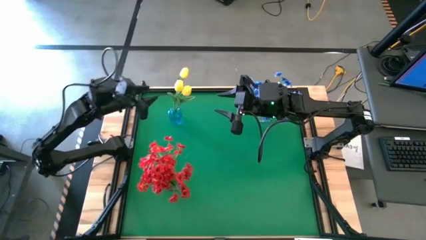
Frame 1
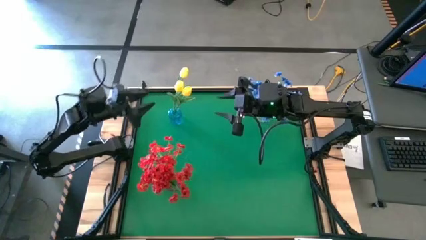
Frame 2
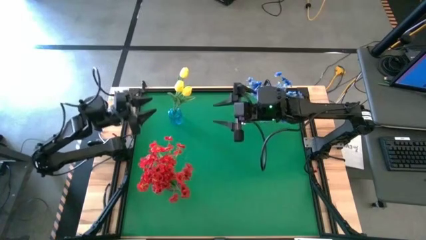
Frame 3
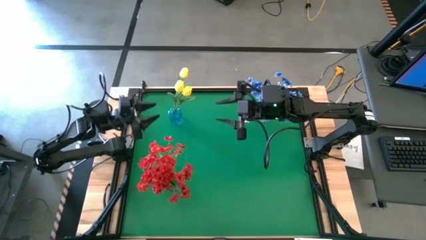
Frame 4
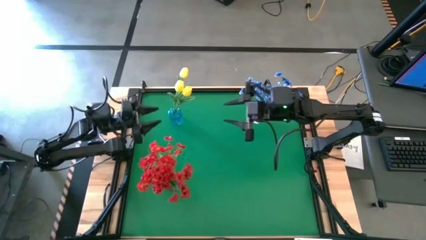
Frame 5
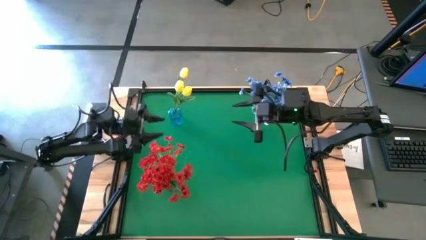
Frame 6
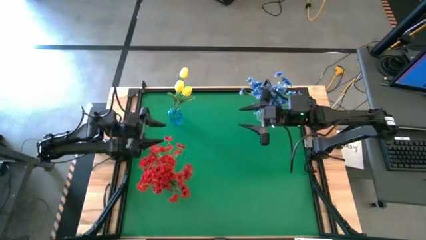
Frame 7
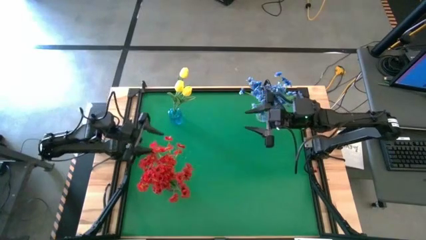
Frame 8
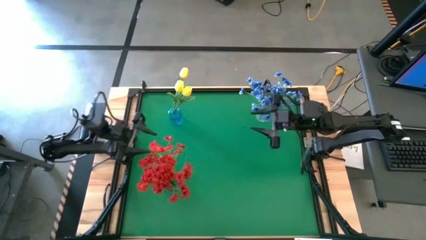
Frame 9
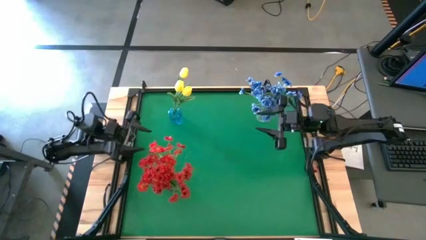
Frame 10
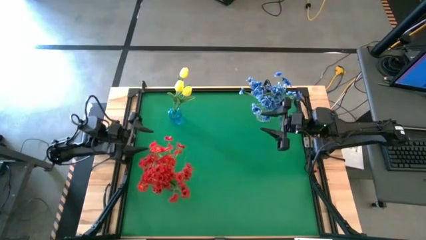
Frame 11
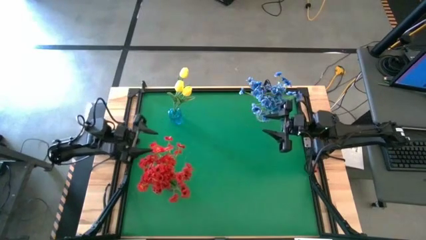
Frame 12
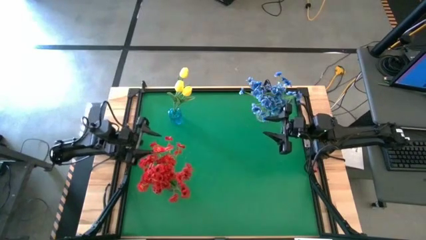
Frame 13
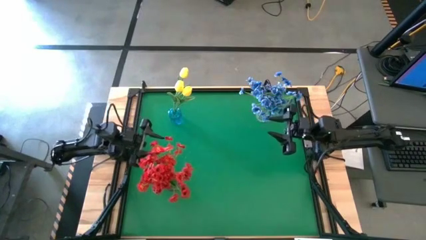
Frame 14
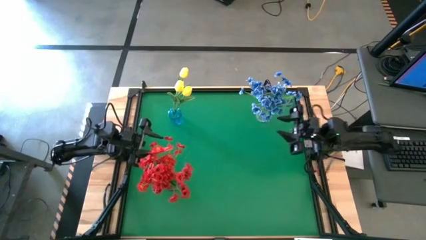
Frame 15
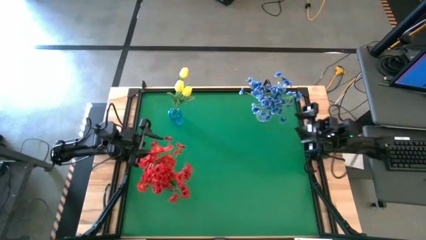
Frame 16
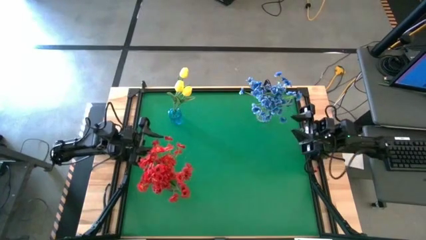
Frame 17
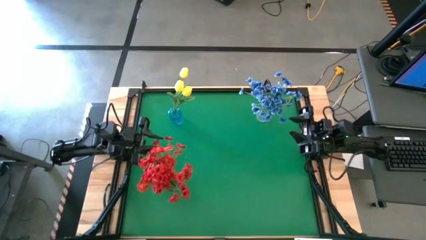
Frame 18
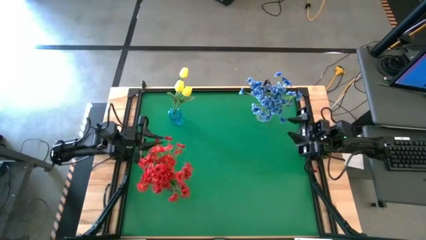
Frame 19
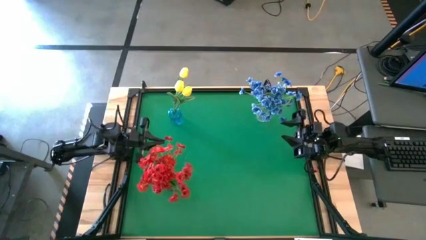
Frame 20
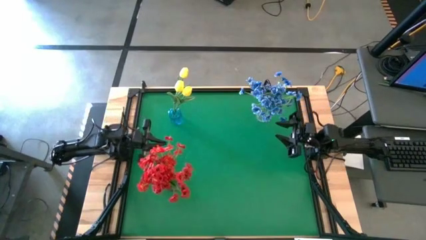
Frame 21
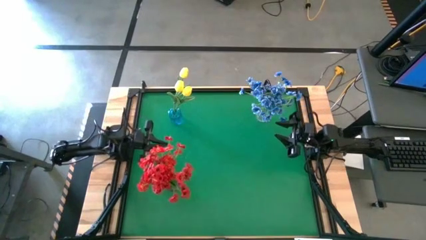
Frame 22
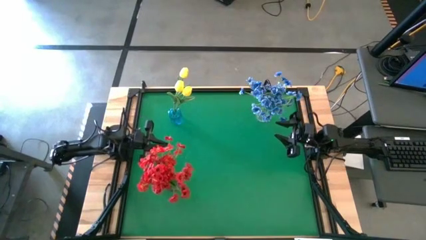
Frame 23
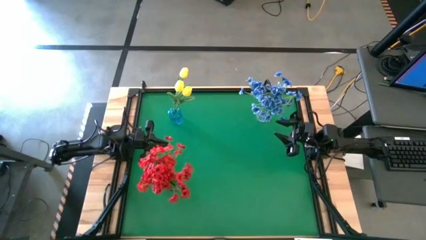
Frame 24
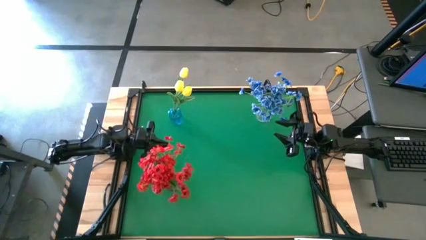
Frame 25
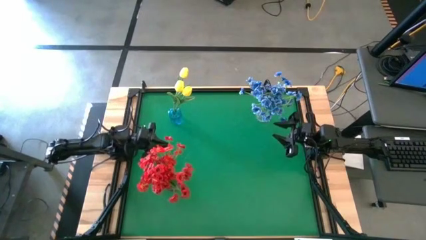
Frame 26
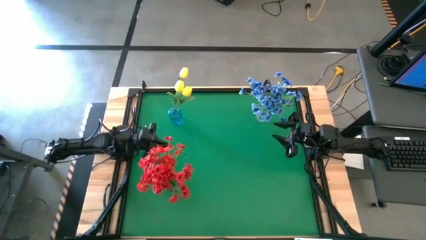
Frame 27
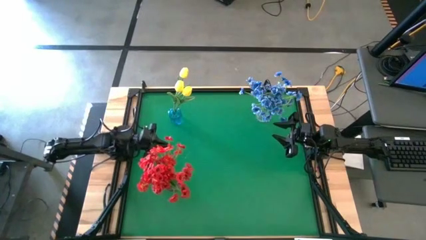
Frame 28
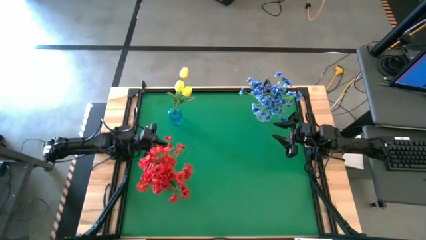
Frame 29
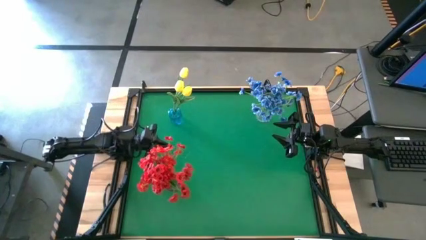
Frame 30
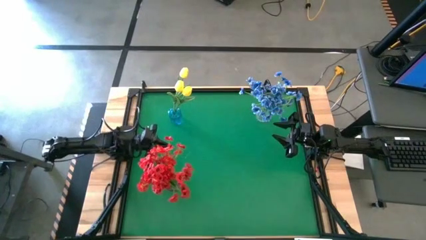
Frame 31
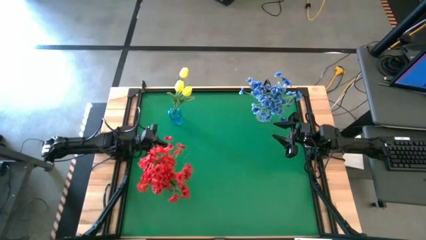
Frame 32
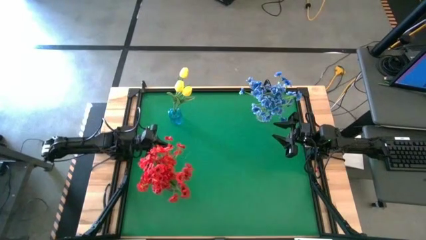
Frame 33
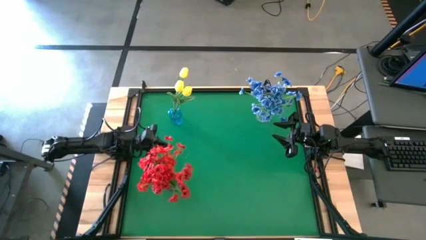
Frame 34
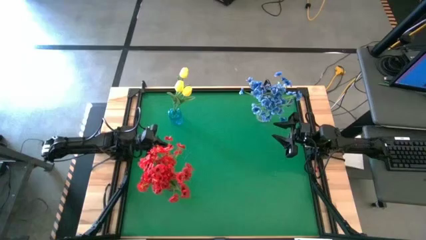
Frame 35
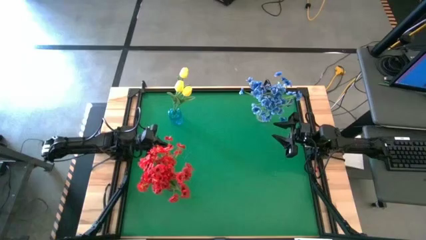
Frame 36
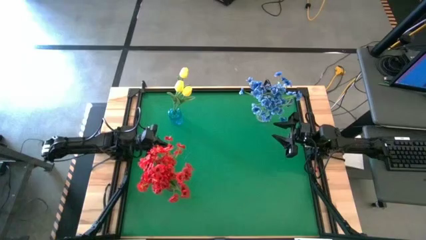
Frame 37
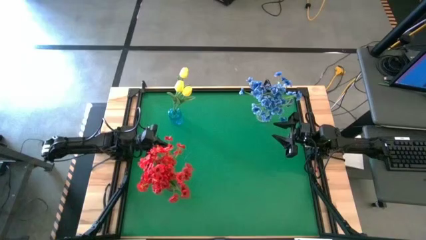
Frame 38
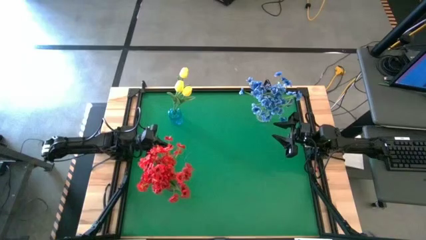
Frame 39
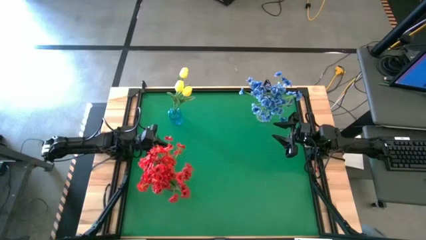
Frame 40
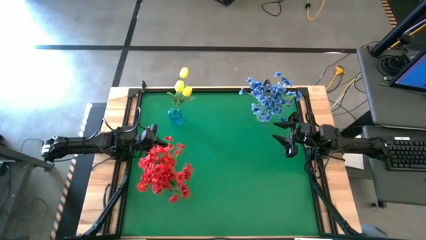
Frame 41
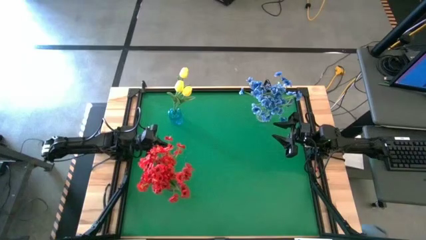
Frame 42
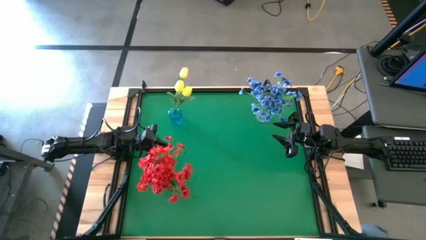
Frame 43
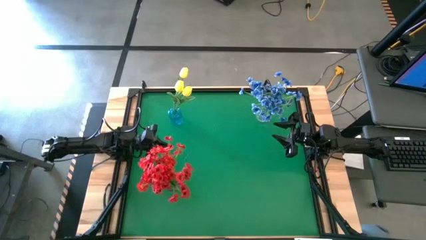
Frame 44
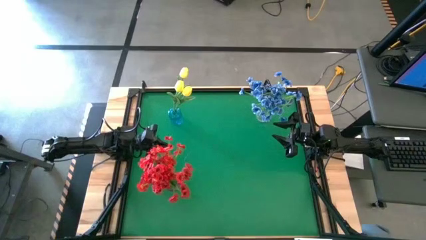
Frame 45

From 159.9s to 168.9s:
Task: Sort flowers into vase by color
Return to Home Position

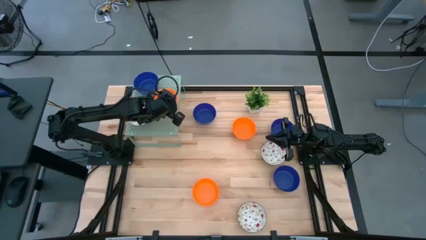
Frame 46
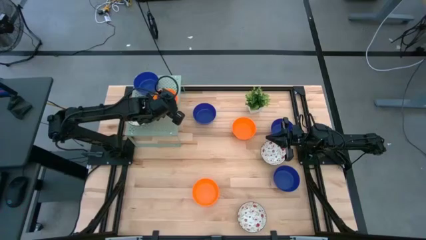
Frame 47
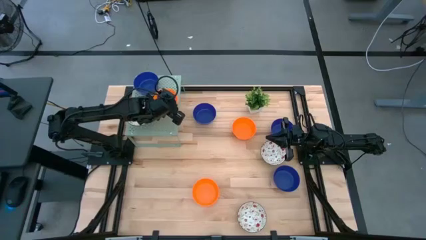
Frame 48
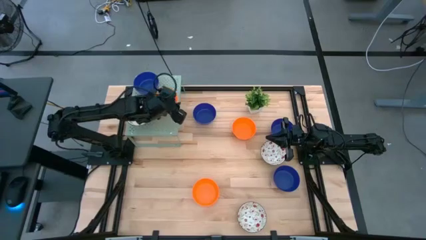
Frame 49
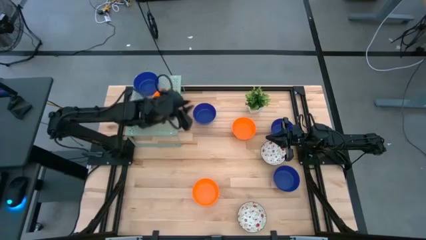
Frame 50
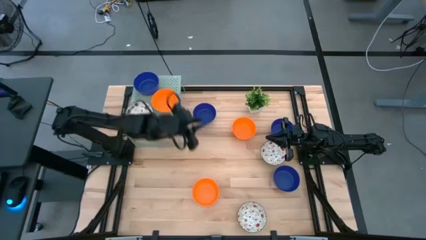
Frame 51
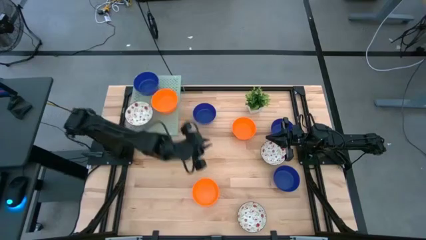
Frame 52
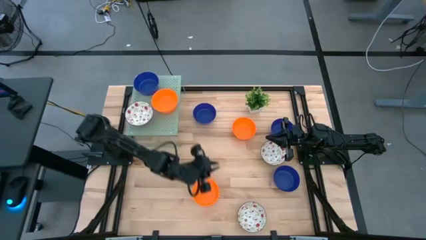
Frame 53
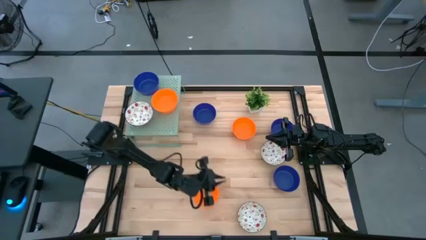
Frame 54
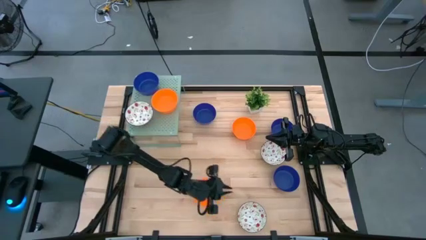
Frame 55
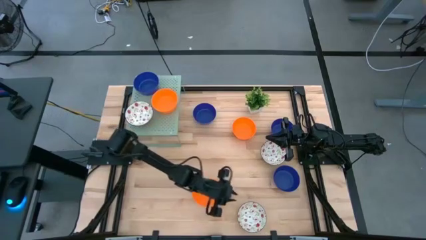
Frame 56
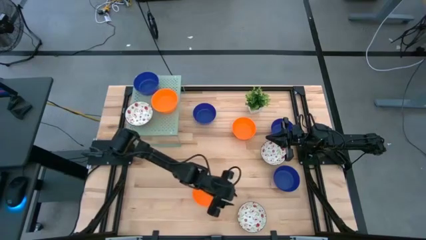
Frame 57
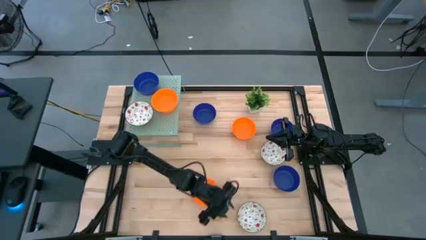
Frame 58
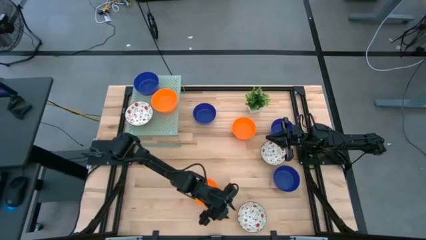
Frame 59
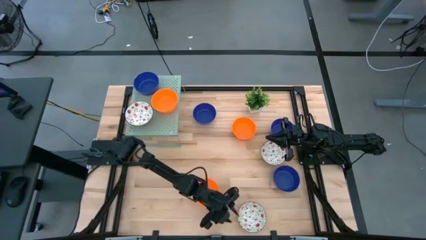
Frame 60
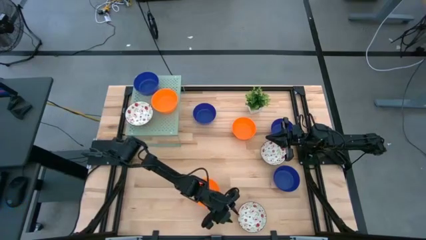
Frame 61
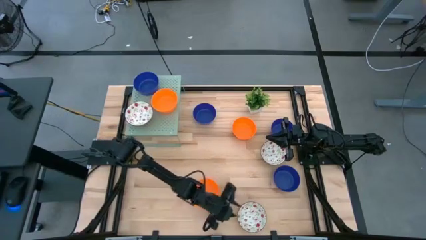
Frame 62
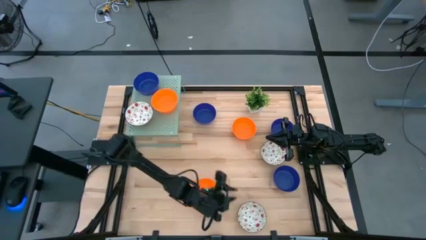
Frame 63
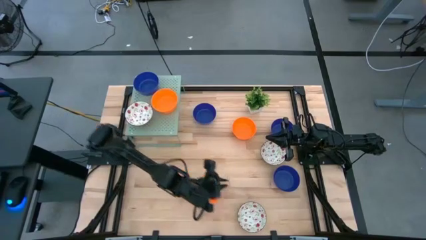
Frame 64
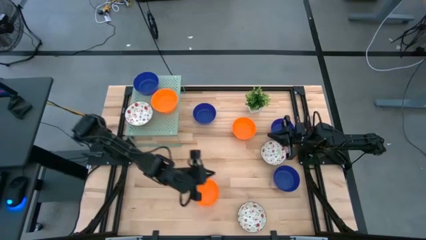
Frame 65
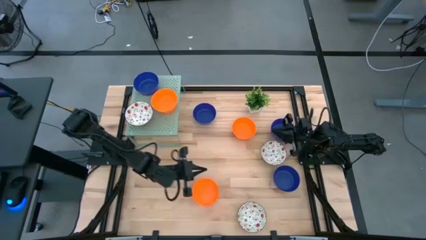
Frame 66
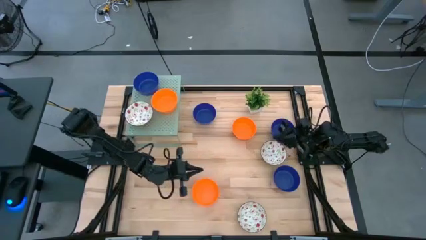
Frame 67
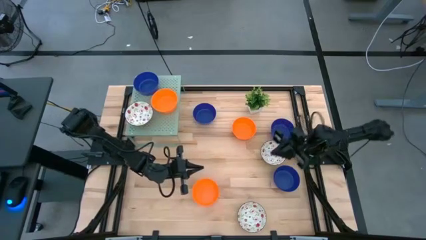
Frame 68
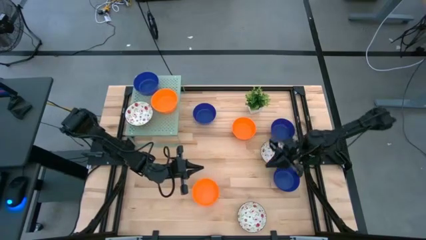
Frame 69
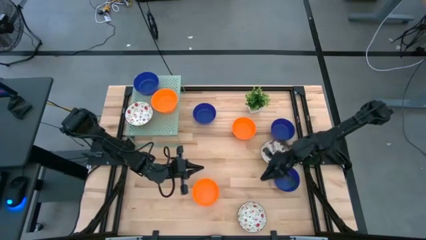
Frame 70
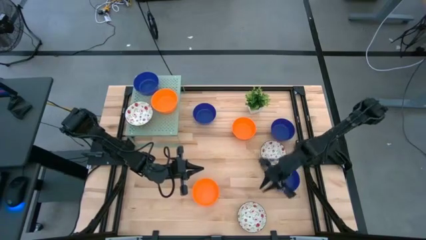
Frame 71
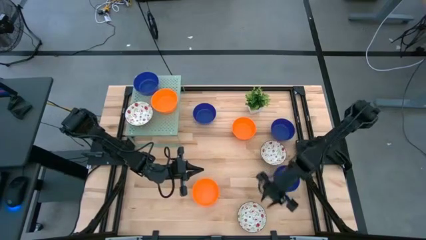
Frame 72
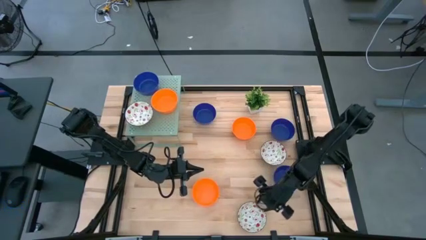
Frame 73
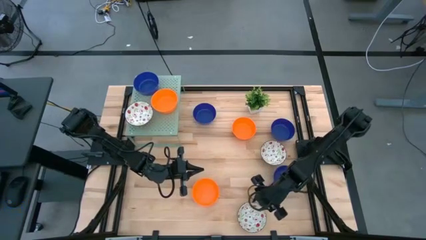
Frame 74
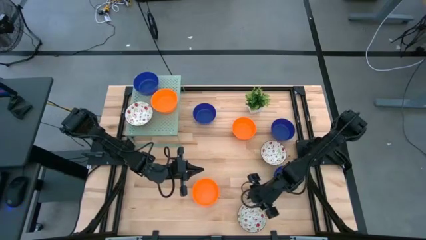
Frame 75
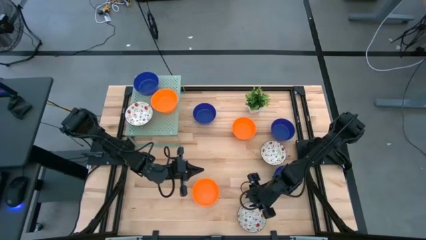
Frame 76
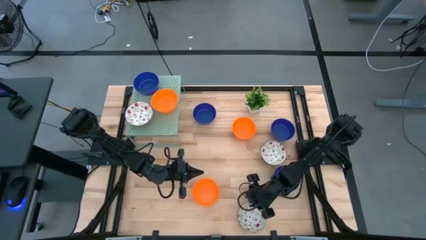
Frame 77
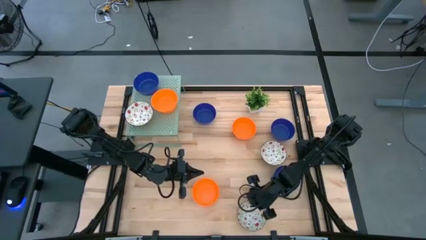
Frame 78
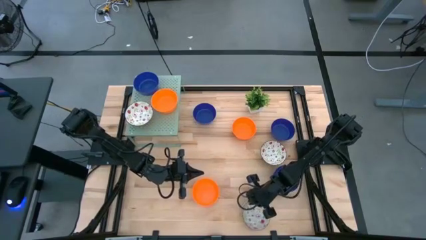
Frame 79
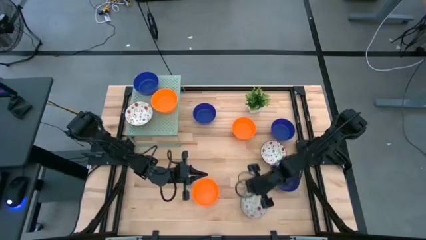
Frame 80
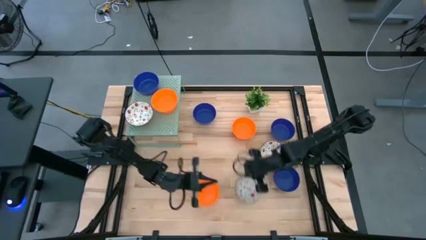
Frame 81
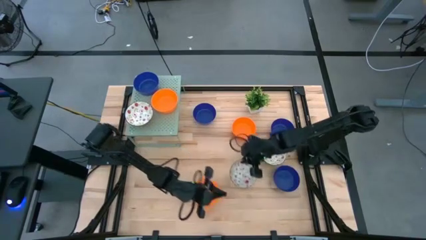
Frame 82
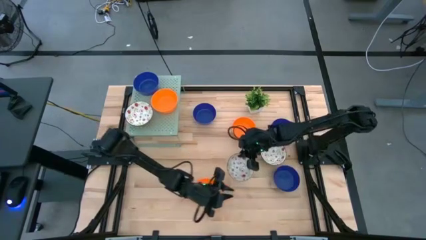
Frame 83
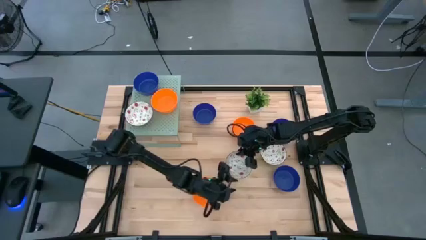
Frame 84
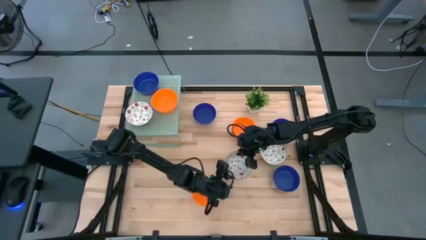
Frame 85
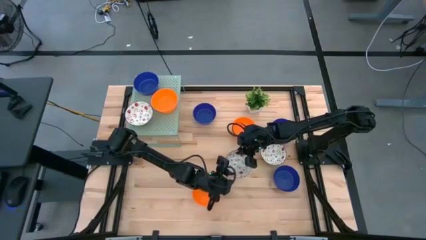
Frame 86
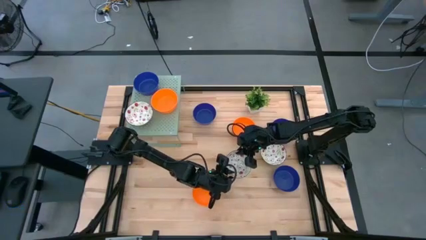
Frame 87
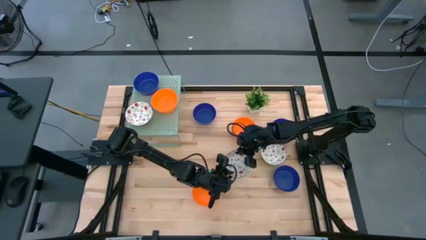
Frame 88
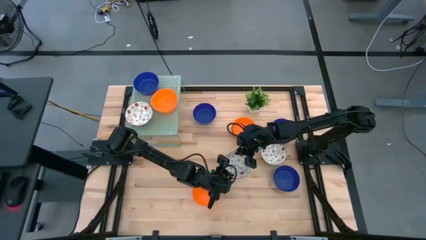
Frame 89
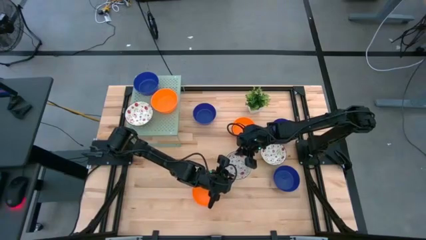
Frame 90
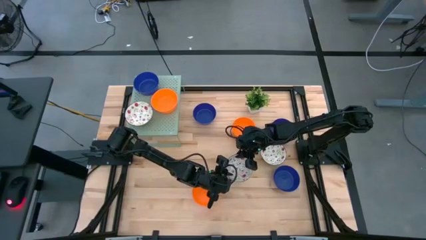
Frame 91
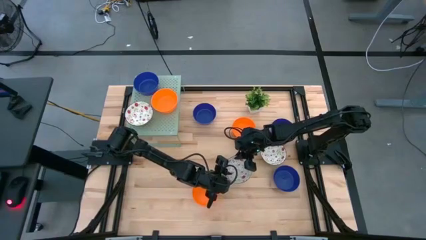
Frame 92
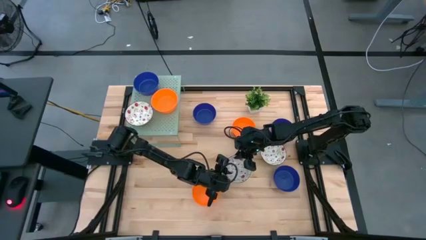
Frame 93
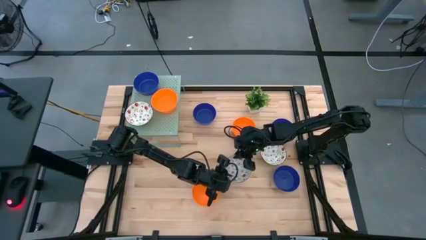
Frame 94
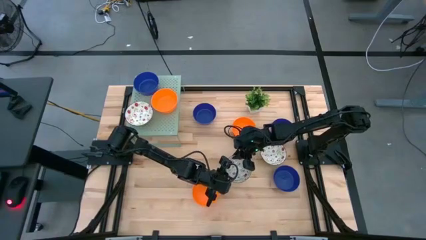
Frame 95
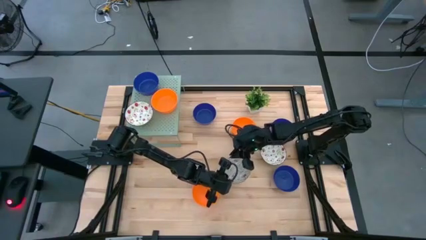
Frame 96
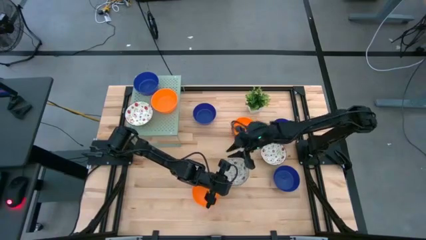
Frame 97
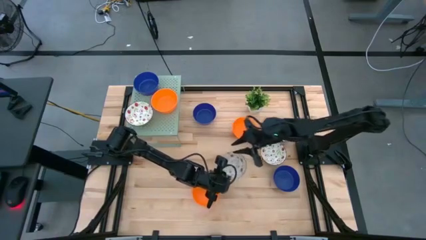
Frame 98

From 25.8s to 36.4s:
Task: Pick & Place Mini bowls
Stack the white bowl on the white bowl on the shelf
